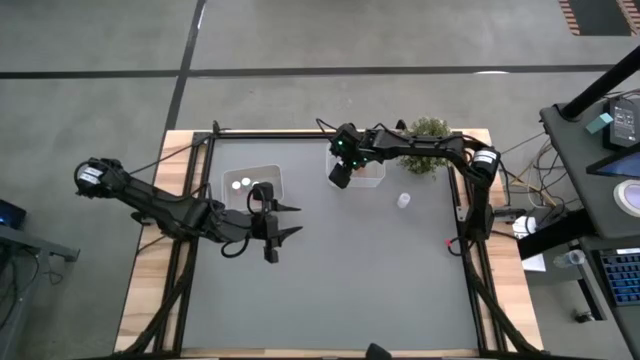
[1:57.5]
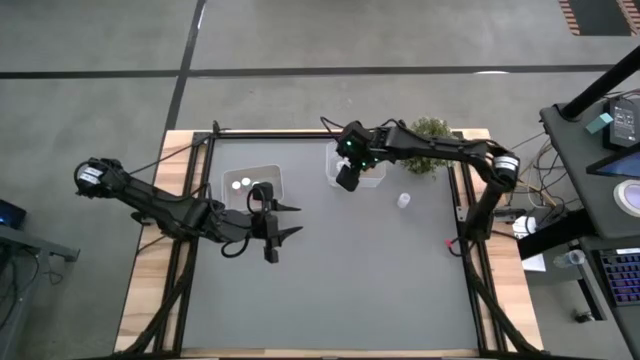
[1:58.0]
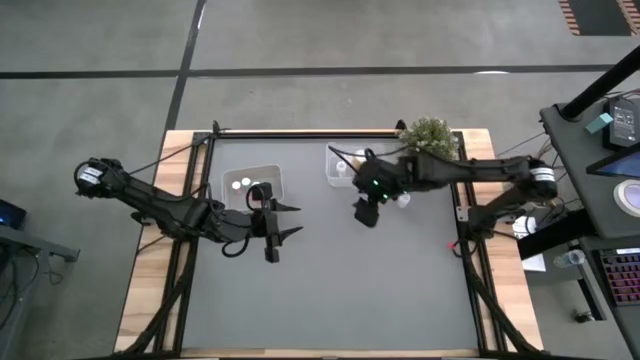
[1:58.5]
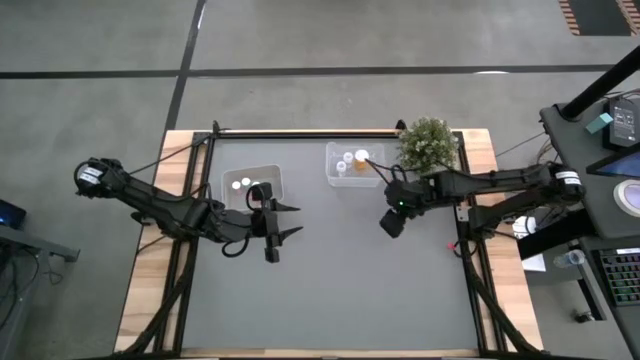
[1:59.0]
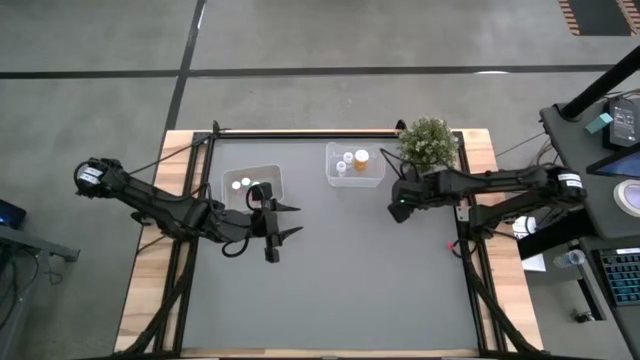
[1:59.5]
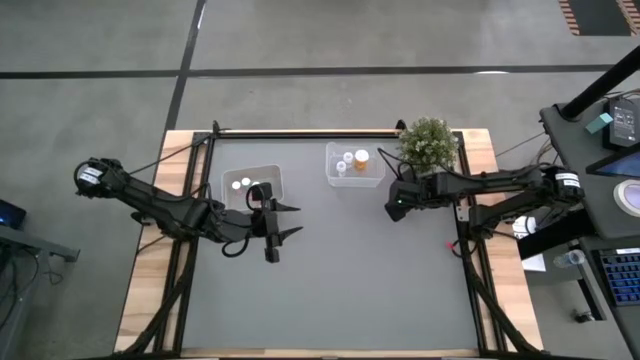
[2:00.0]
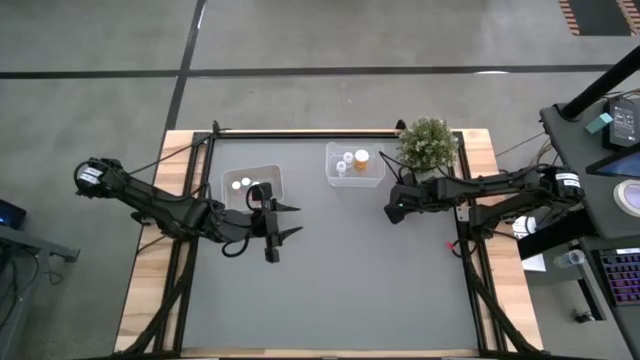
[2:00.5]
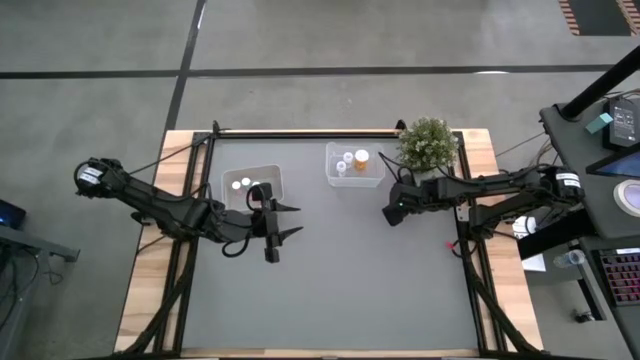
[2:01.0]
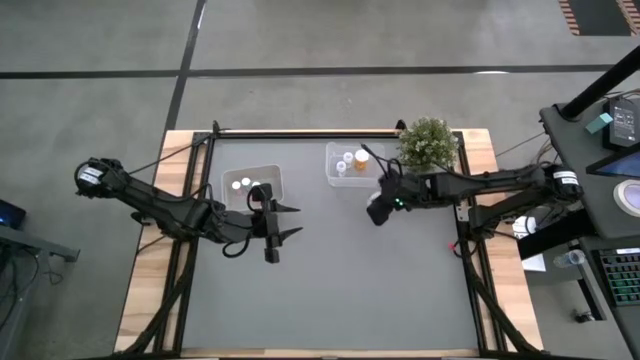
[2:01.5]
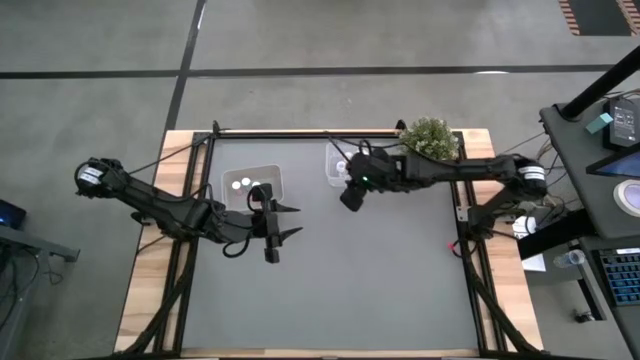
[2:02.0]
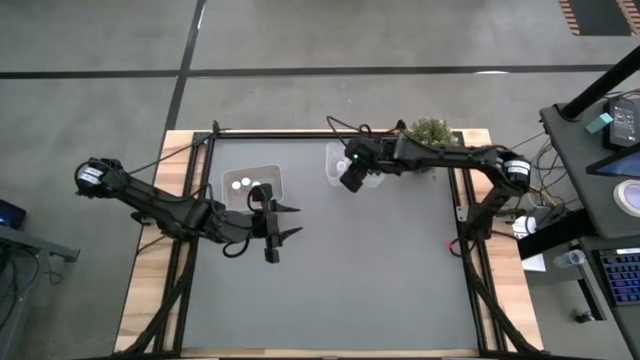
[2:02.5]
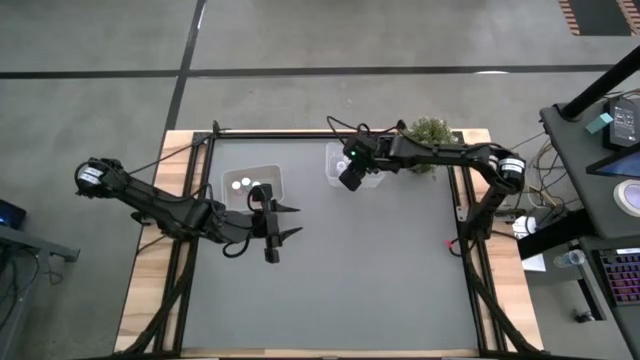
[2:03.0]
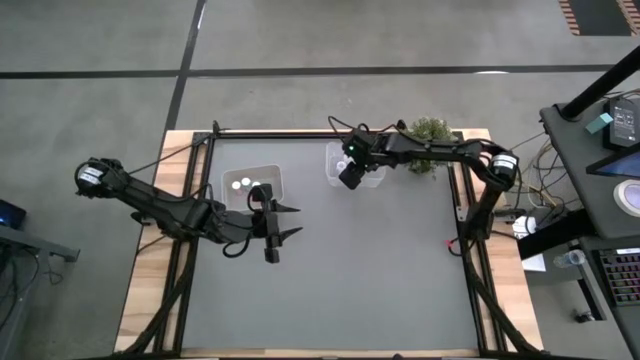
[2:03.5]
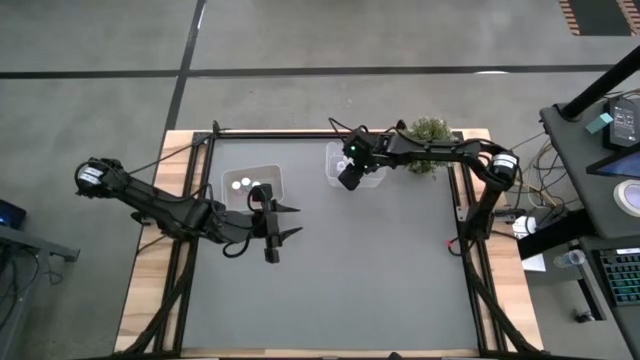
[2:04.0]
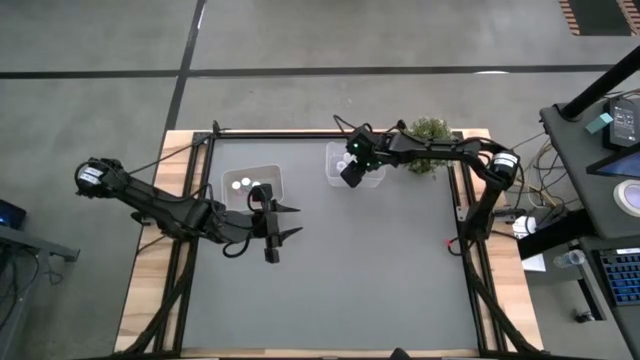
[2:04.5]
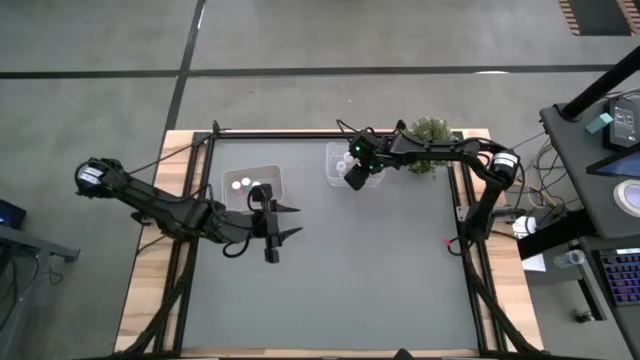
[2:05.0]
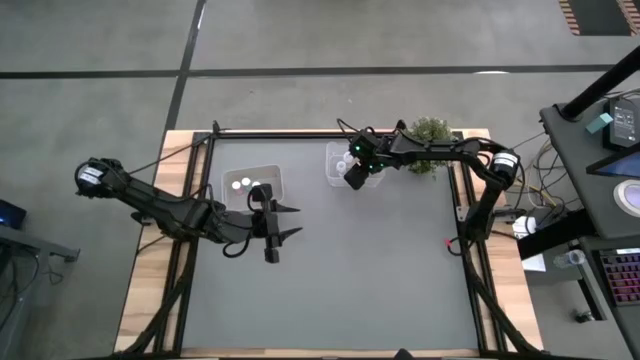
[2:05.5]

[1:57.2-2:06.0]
Task: Pick and place medicine bottles into bin by pill shape (circle, oval)
Put the big transparent pill bottle into the transparent bin

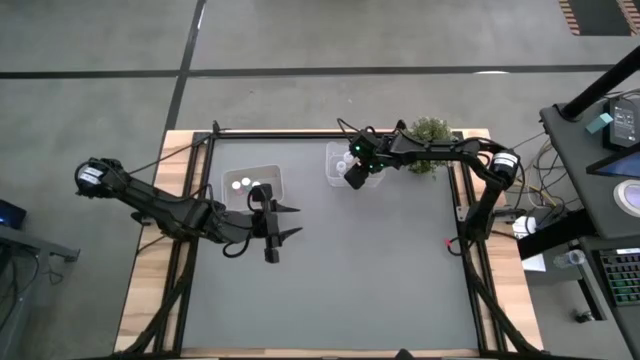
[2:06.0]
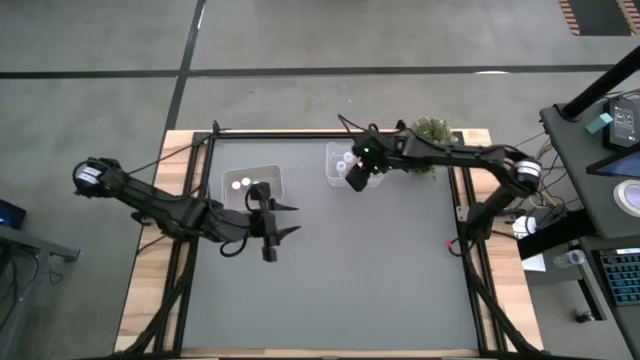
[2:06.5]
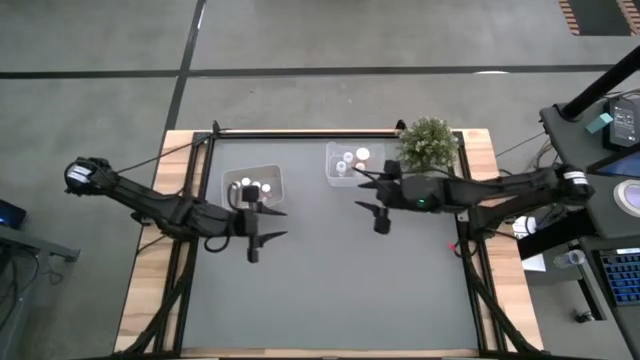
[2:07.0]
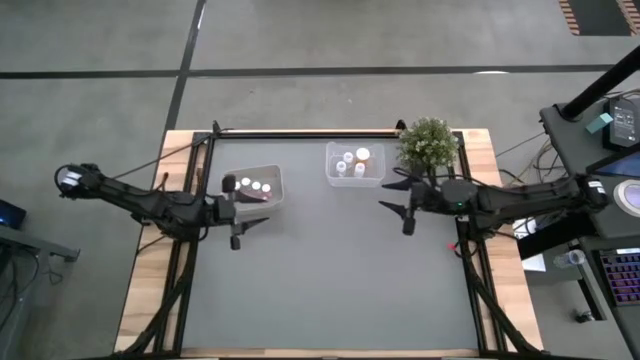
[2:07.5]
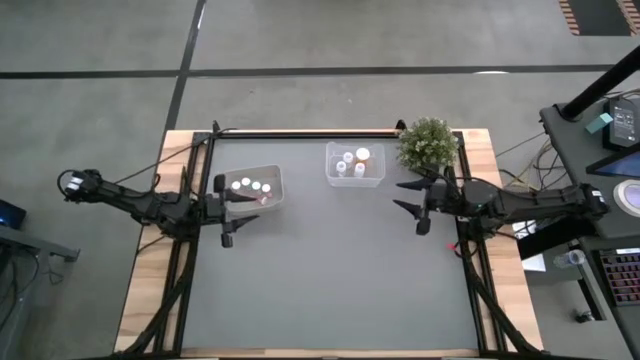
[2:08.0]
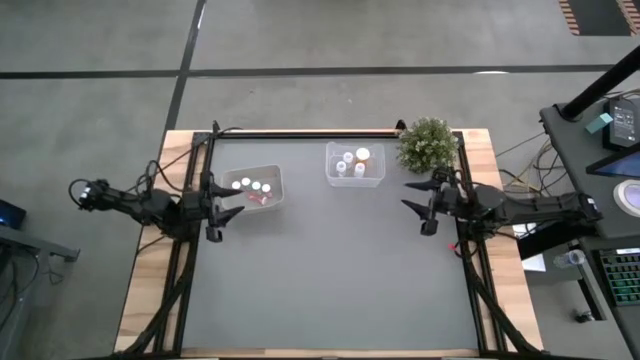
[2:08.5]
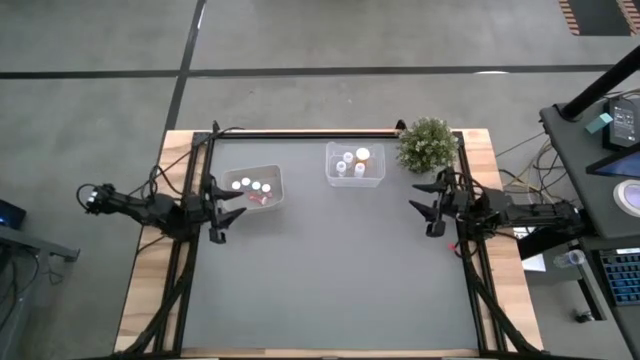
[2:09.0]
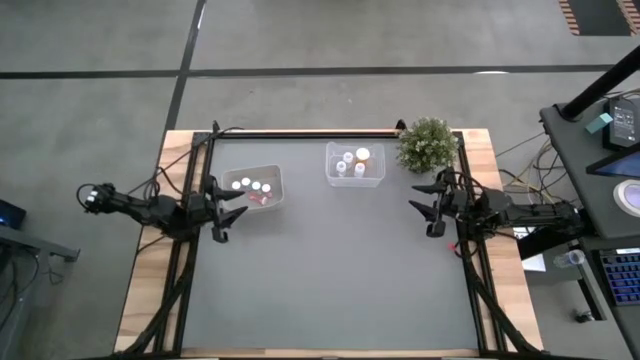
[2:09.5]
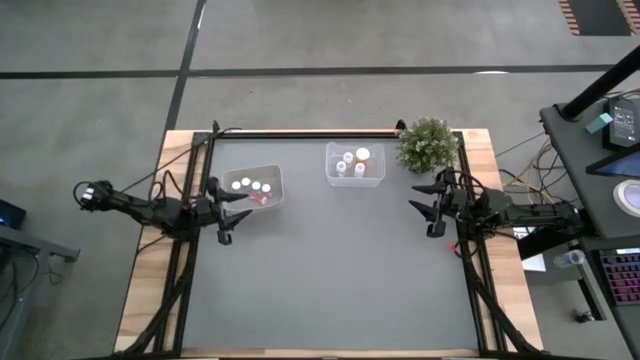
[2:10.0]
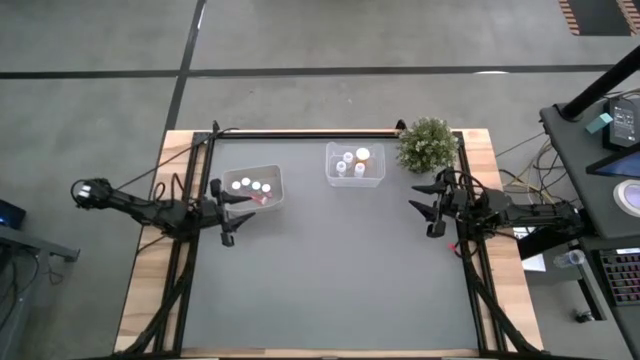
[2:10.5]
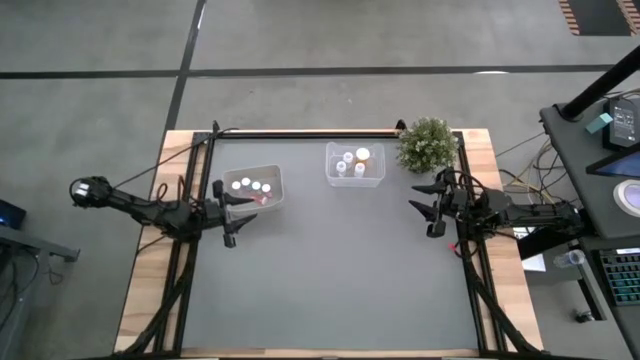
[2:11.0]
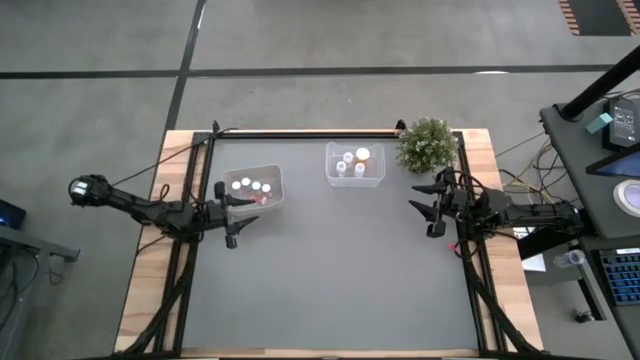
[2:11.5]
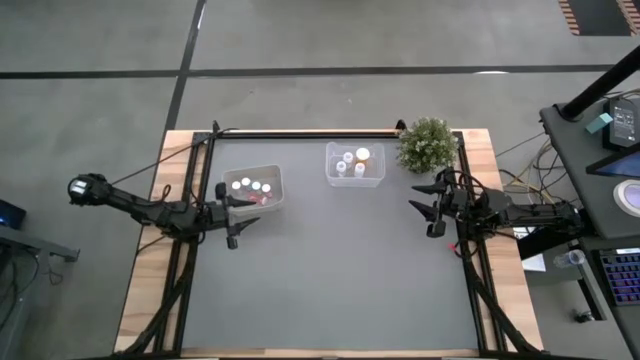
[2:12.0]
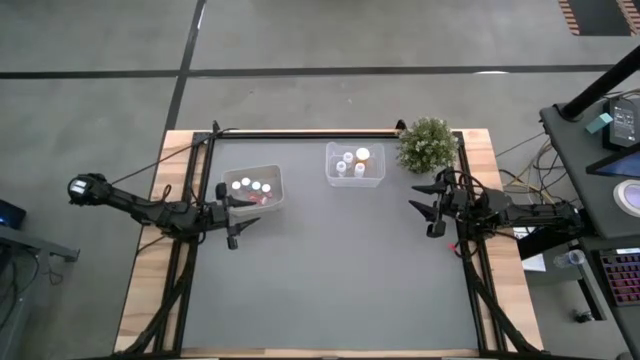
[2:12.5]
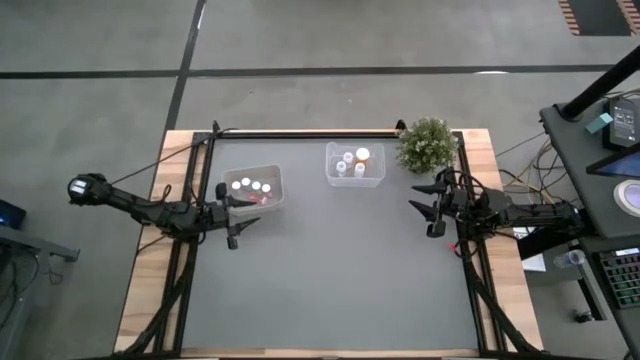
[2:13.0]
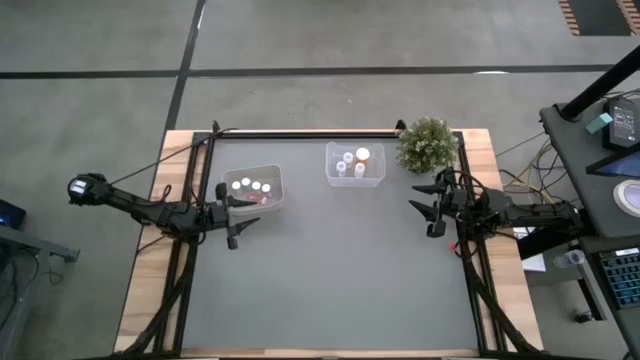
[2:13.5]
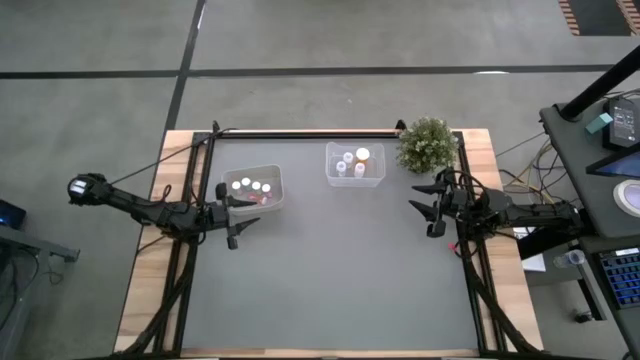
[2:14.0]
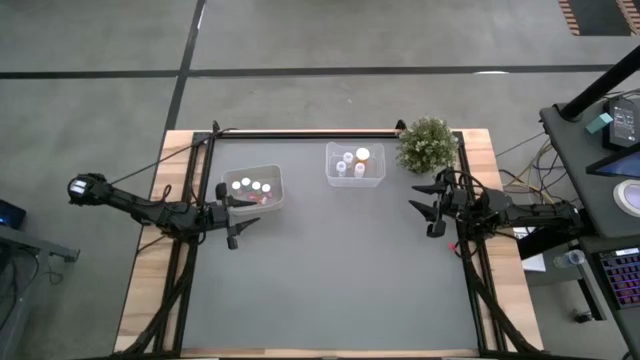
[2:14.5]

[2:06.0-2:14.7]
Return to Home Position
